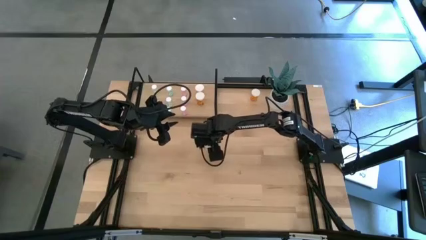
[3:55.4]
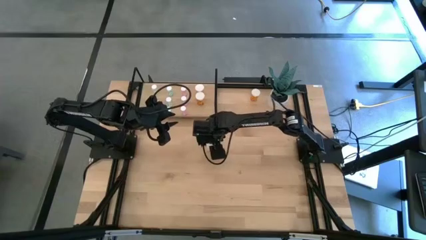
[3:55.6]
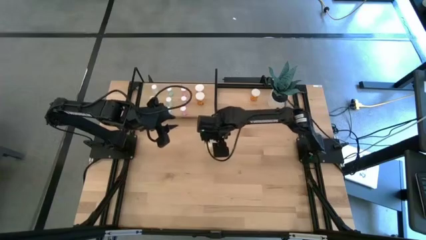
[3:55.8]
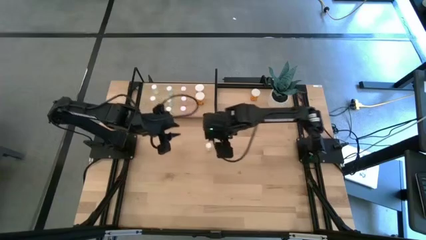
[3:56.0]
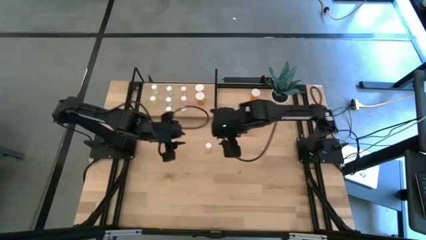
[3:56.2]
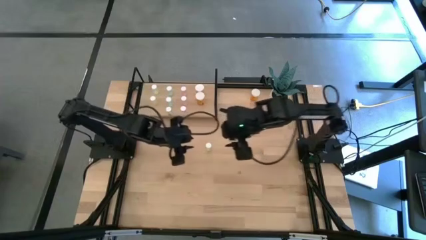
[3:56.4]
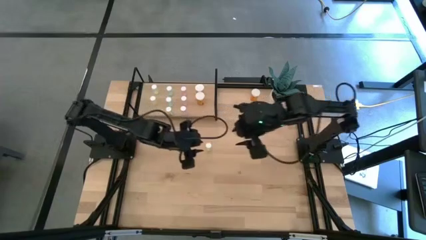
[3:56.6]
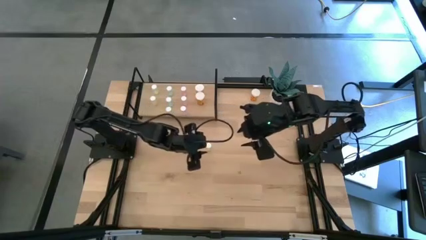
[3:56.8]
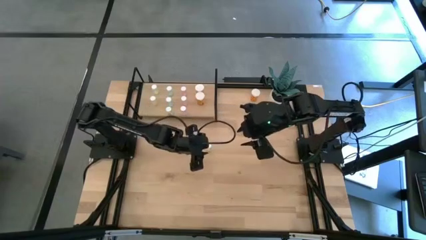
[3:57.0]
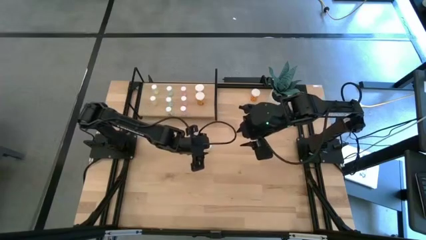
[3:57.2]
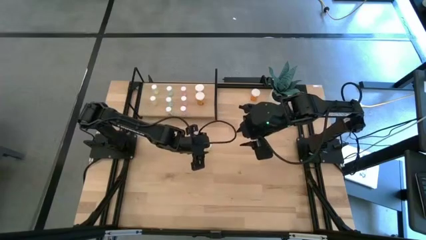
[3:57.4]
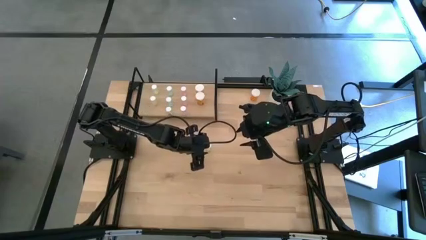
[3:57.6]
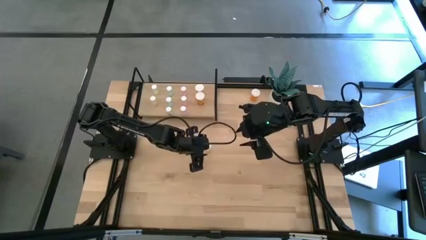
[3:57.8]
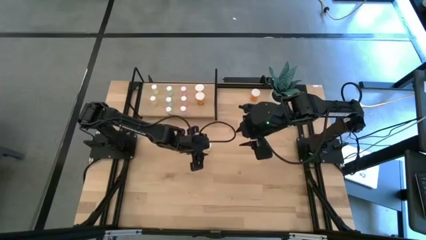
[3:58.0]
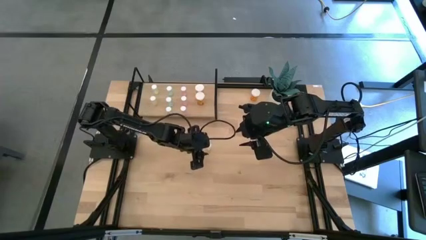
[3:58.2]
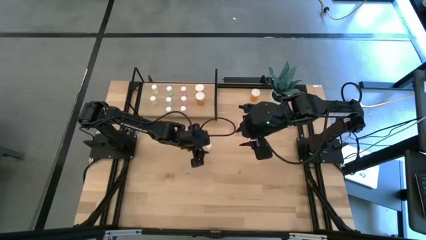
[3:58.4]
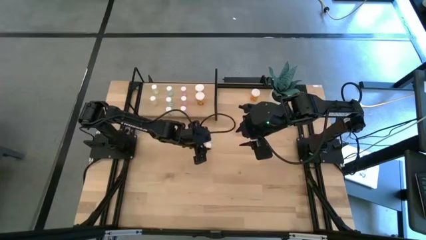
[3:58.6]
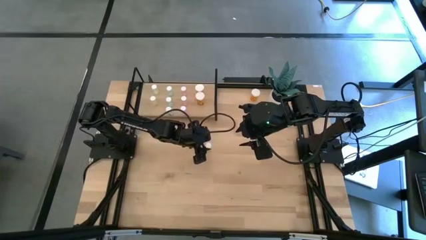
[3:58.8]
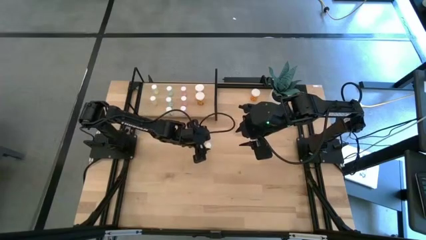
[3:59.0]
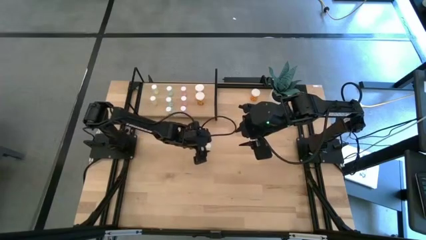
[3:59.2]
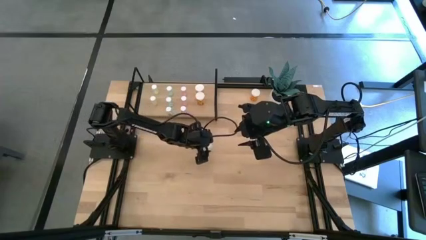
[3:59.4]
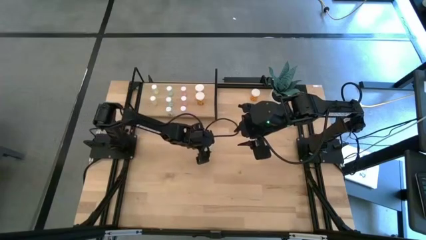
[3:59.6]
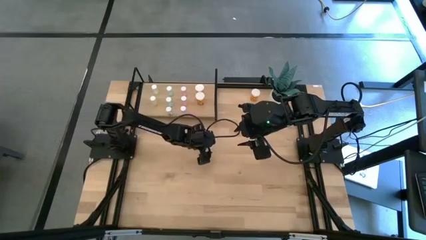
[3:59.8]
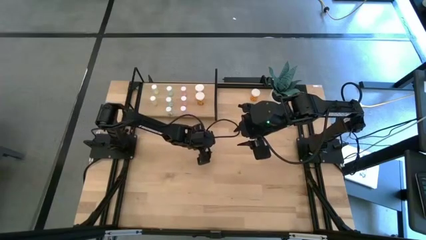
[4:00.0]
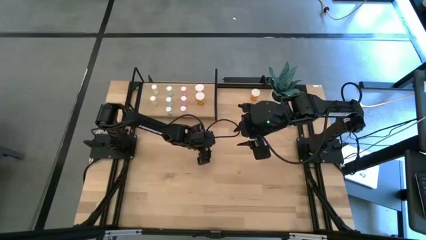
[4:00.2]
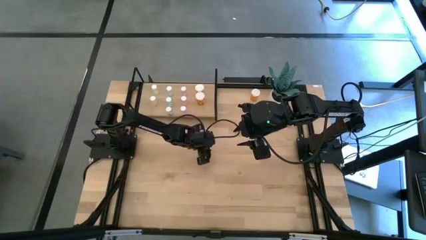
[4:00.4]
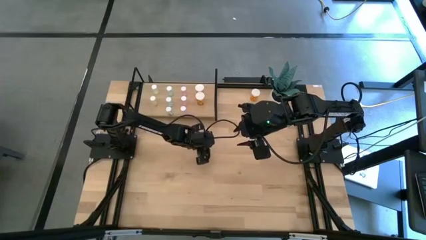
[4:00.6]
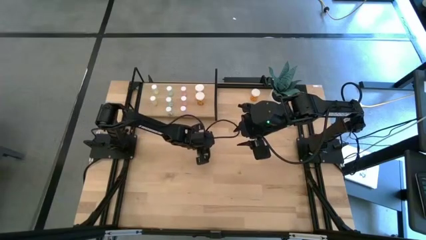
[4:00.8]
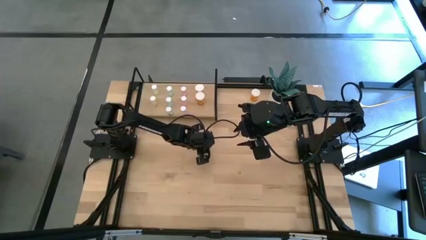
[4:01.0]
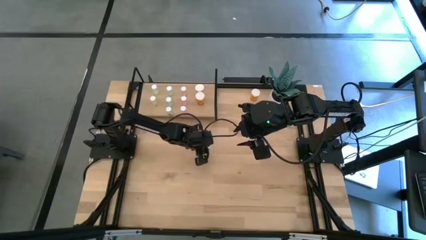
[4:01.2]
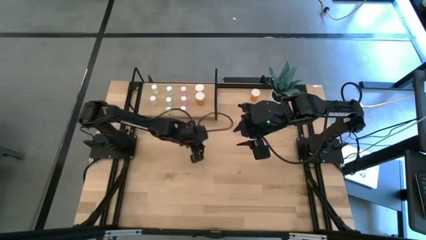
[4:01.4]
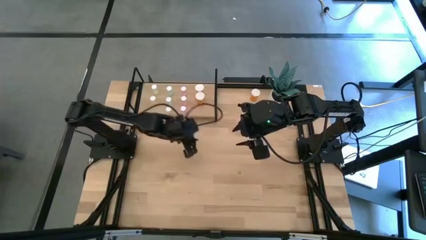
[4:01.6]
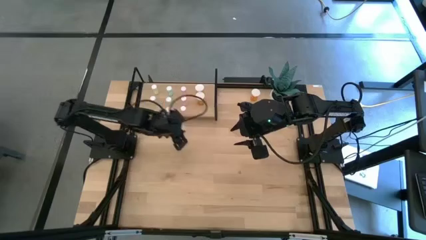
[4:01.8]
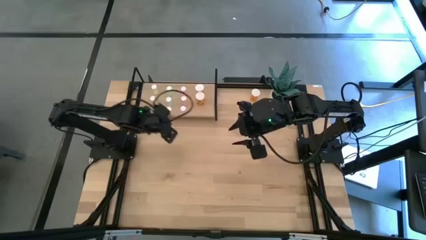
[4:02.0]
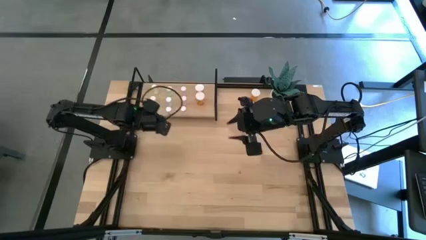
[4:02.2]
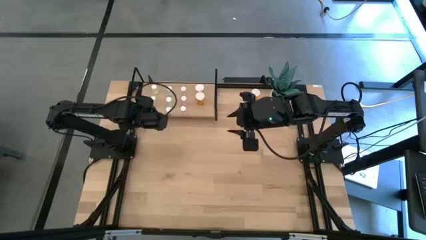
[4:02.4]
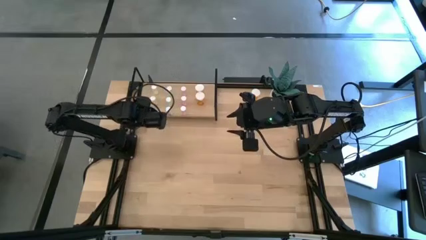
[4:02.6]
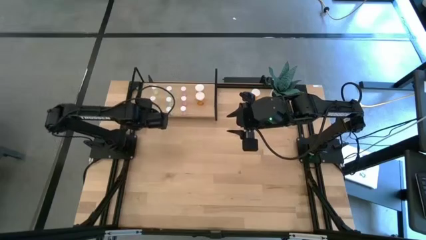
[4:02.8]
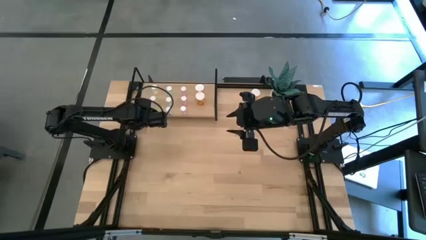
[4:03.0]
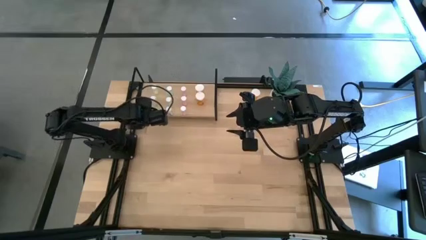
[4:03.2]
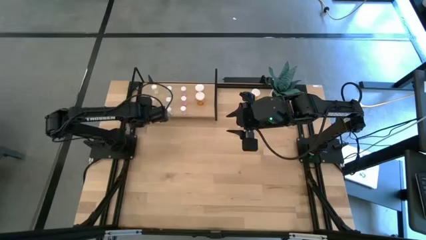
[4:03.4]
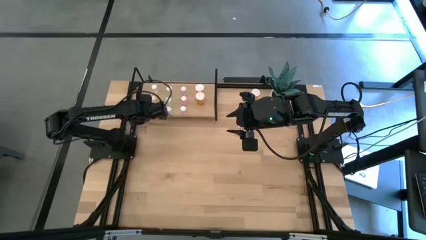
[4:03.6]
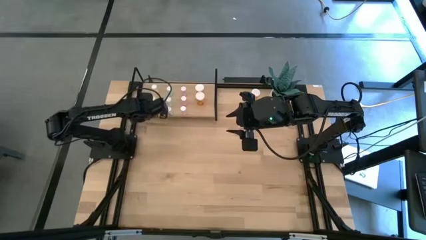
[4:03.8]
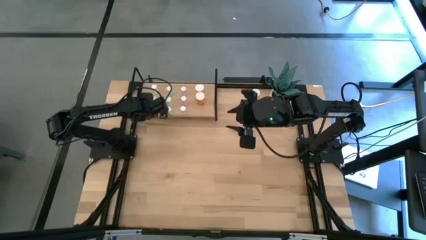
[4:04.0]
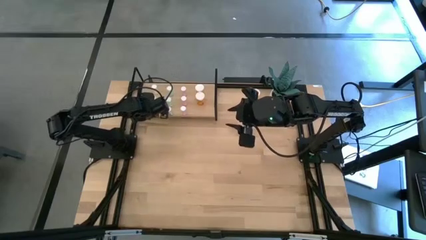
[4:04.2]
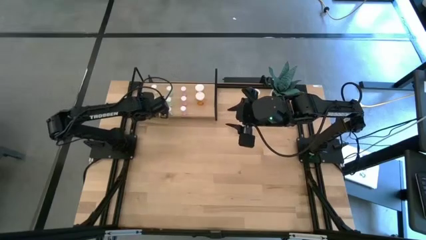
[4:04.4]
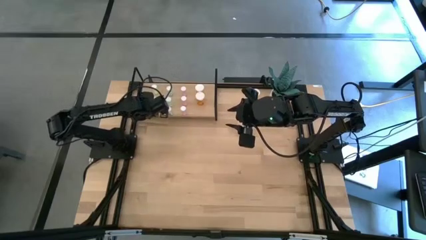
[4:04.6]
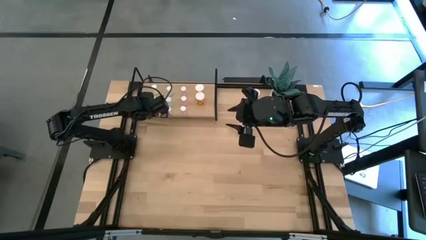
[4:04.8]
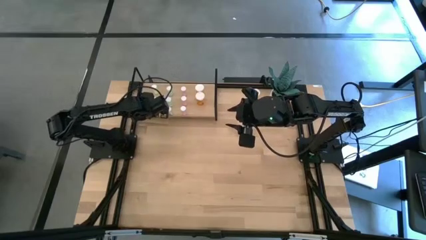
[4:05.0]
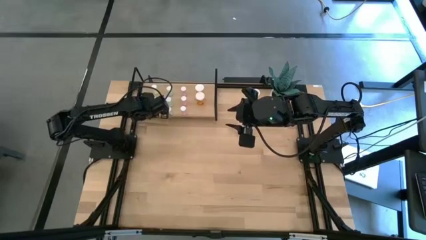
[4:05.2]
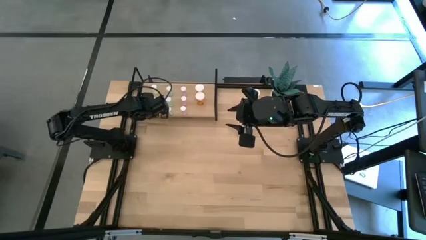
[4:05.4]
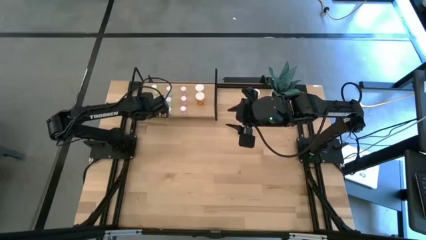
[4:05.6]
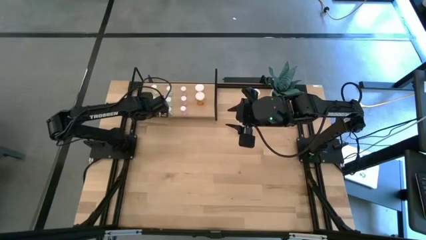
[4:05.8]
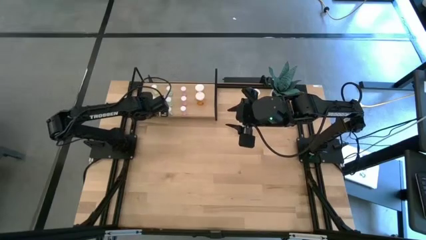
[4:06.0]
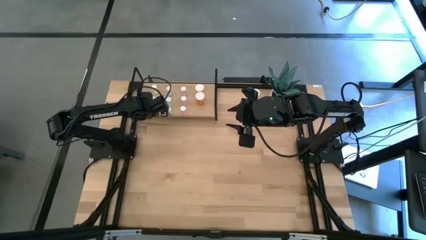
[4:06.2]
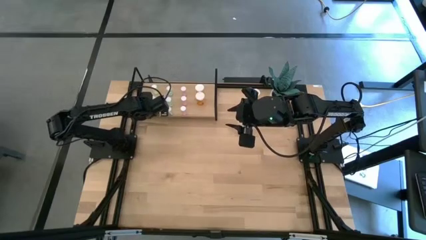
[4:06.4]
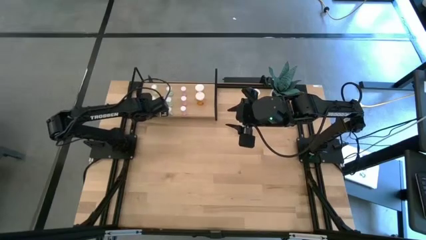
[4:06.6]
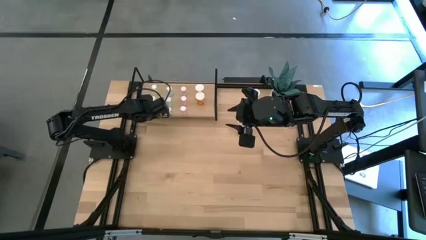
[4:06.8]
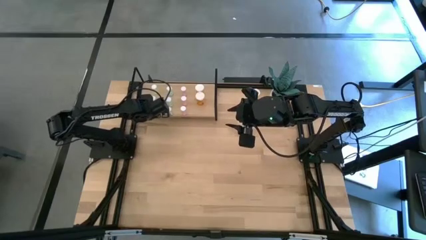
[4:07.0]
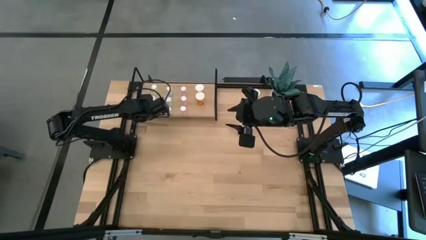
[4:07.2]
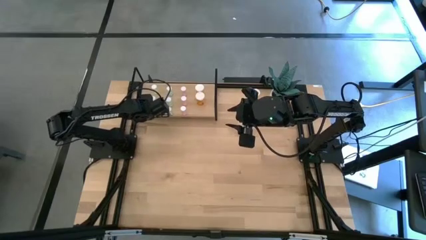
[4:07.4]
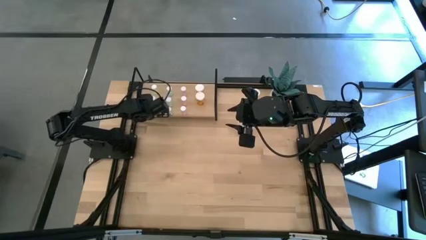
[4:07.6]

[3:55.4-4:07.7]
Task: Pick and place medicine bottles onto shelf by color
Put the yellow pill bottle on the shelf and align it with the other yellow pill bottles

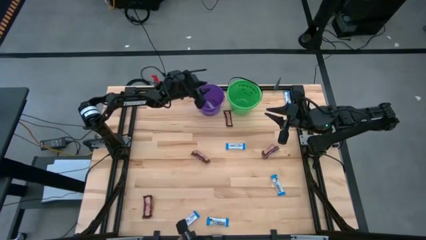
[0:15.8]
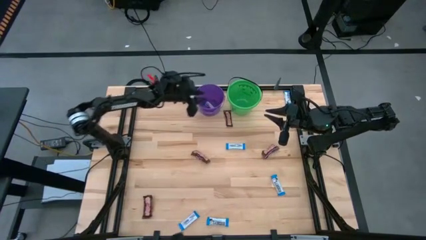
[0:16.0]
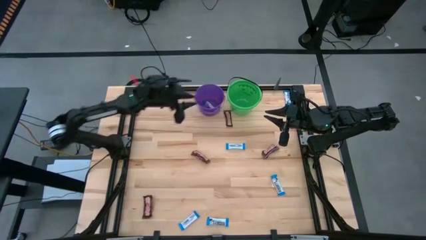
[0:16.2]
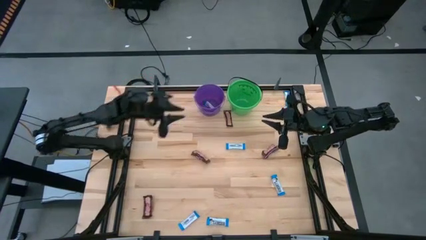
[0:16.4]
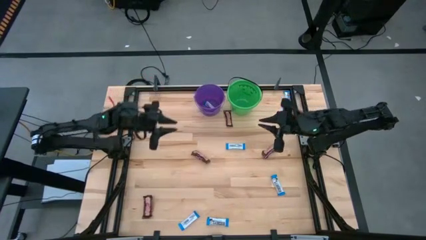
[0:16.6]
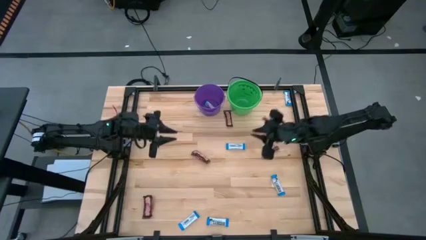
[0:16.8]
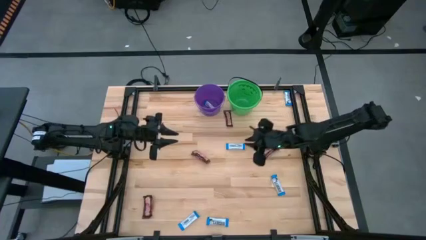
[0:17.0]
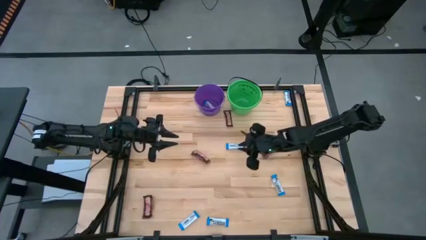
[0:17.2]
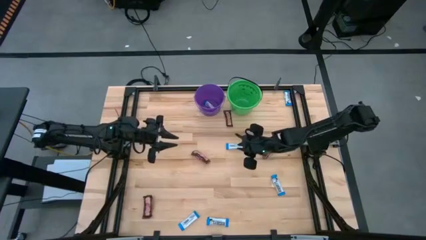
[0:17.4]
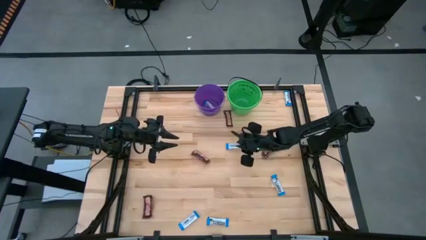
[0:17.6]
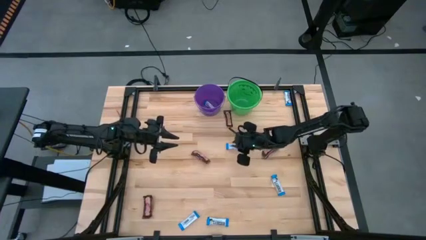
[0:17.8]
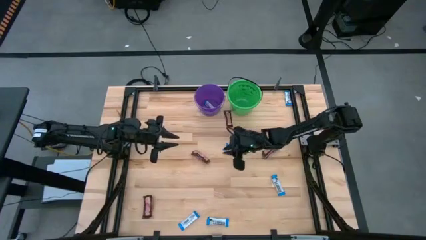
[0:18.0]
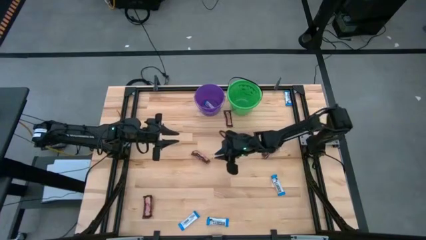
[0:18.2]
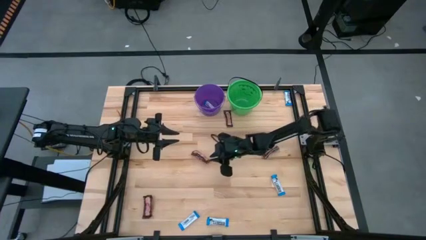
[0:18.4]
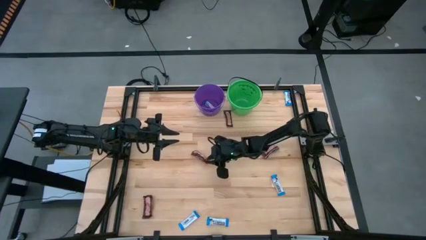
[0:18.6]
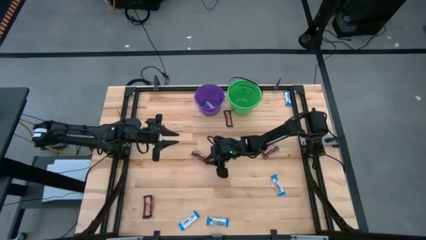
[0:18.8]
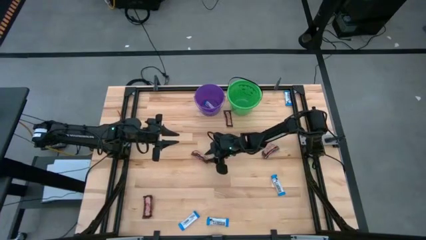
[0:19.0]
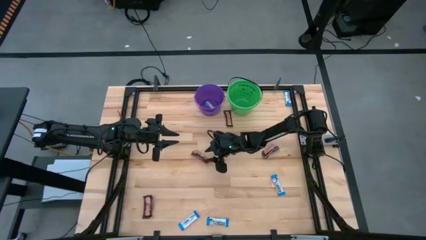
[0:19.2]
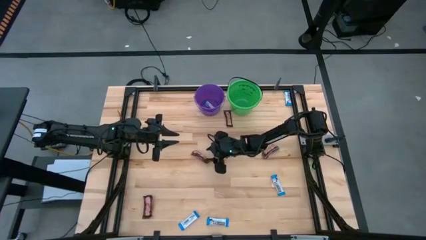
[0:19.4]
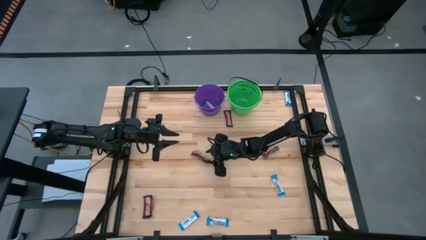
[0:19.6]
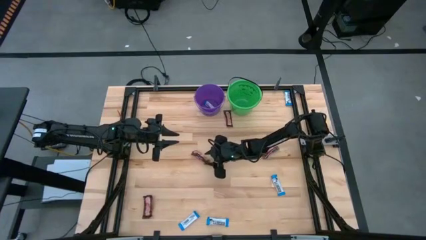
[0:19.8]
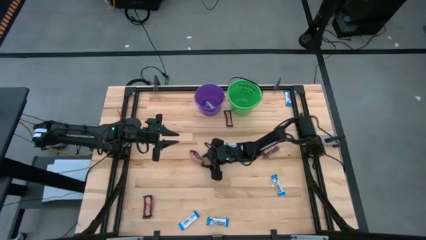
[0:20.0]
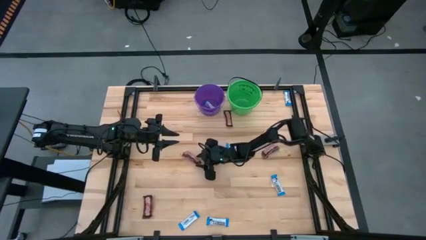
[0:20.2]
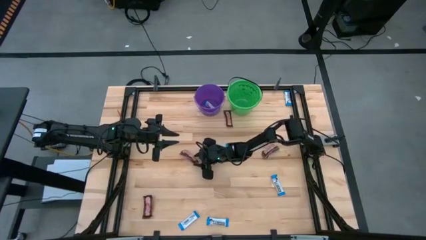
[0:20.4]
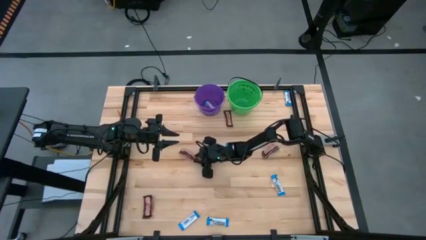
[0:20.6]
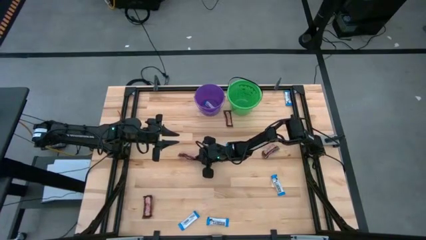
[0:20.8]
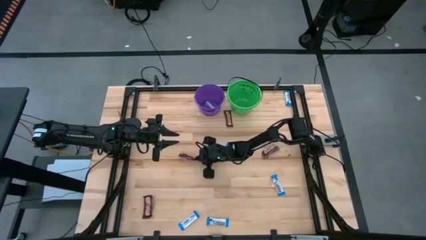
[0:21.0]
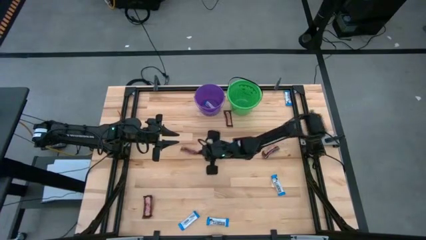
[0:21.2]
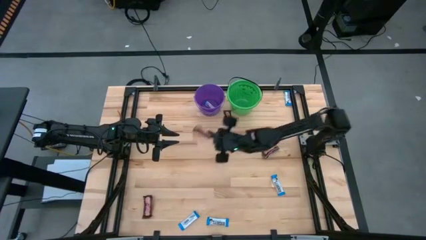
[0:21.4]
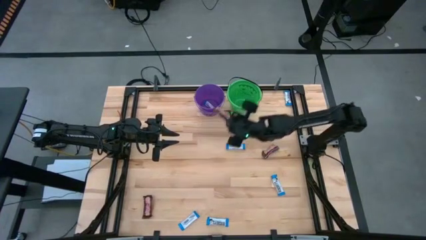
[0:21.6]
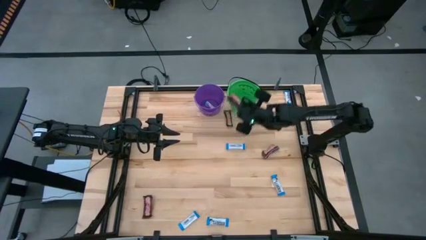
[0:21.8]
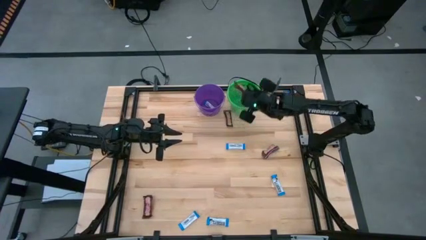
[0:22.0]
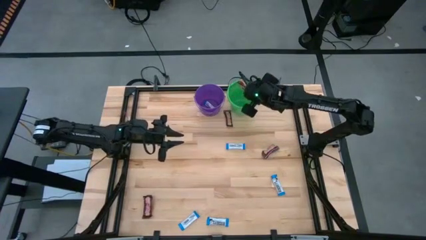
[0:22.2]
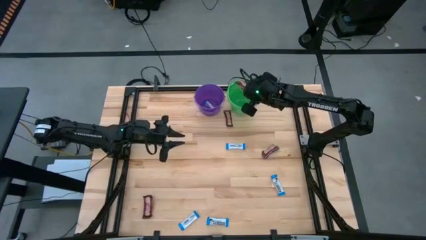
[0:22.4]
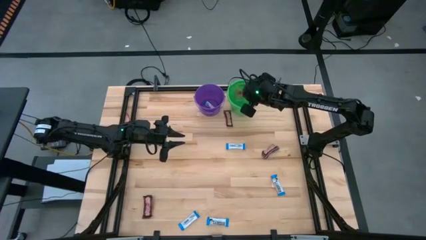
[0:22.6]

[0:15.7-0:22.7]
Task: Sort candy by brand, put in halloween buckets
Put the brown chocolate bar into the green bucket
